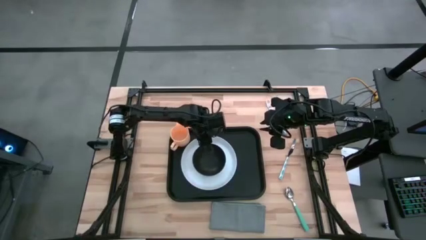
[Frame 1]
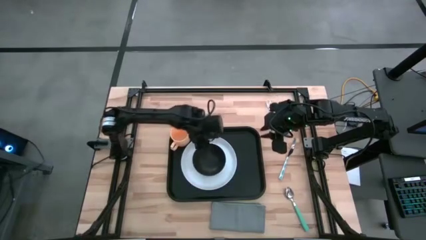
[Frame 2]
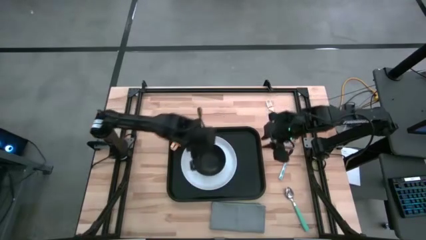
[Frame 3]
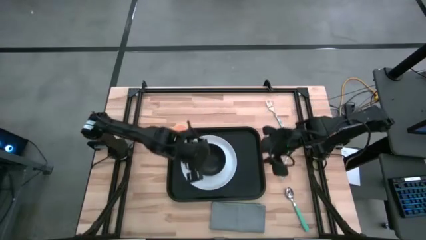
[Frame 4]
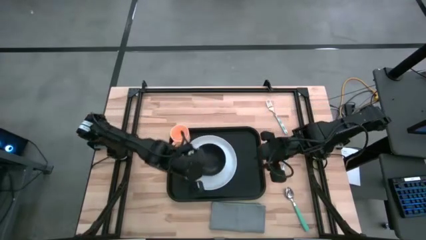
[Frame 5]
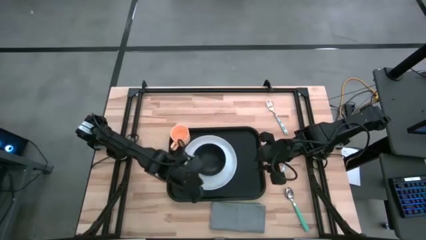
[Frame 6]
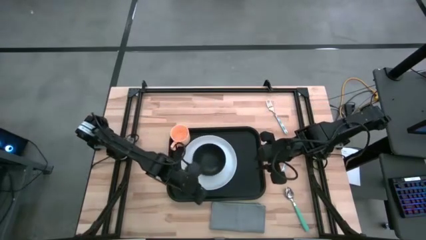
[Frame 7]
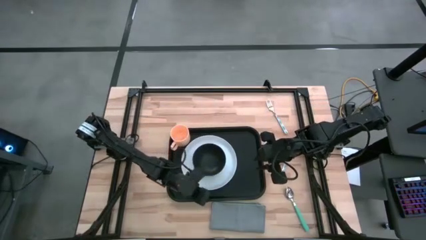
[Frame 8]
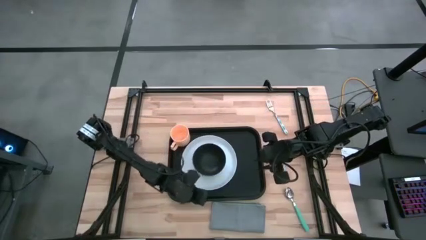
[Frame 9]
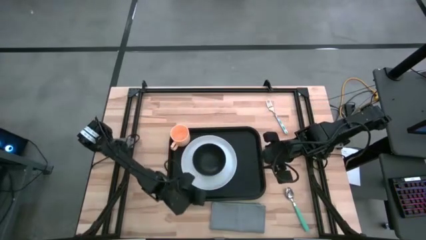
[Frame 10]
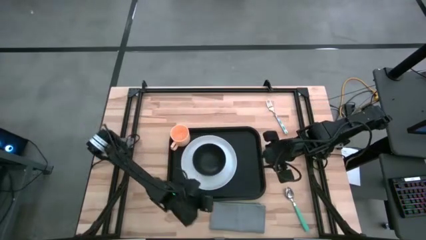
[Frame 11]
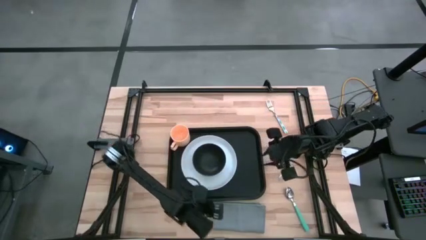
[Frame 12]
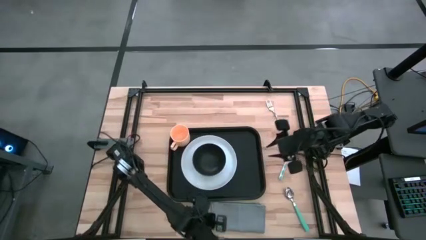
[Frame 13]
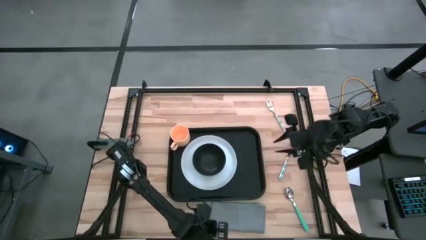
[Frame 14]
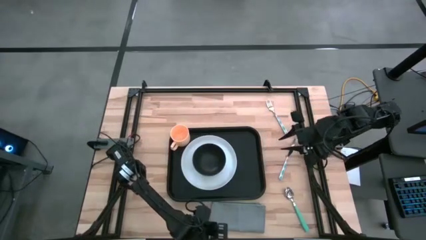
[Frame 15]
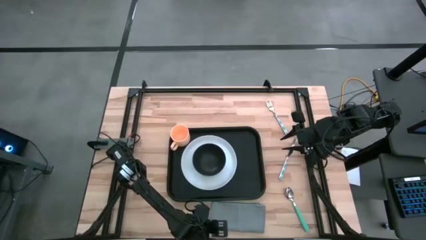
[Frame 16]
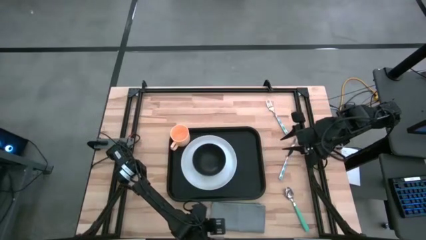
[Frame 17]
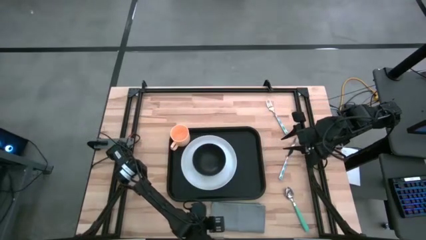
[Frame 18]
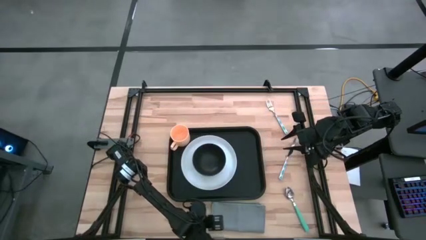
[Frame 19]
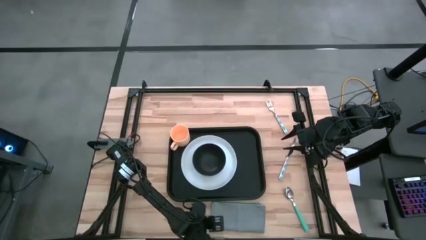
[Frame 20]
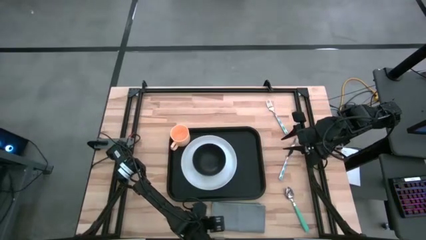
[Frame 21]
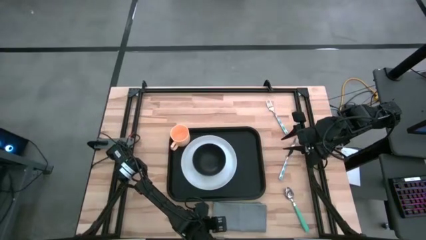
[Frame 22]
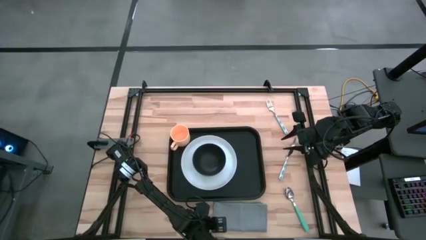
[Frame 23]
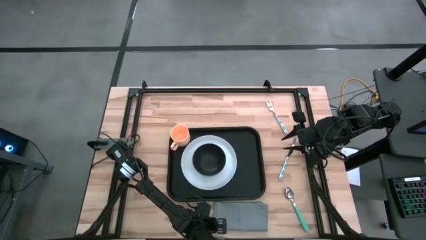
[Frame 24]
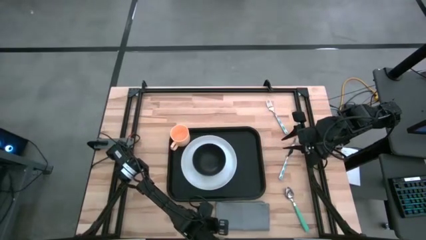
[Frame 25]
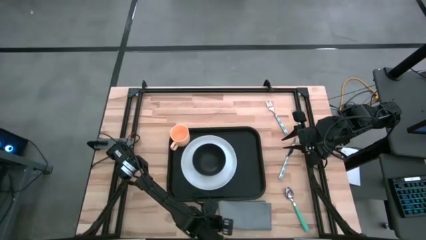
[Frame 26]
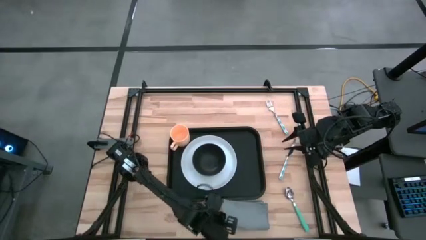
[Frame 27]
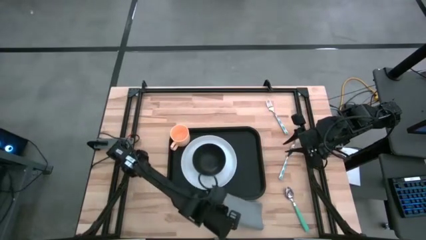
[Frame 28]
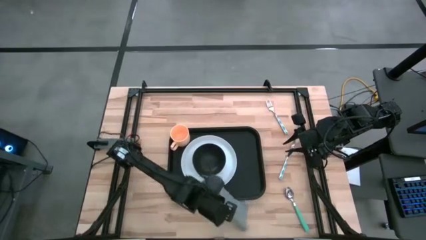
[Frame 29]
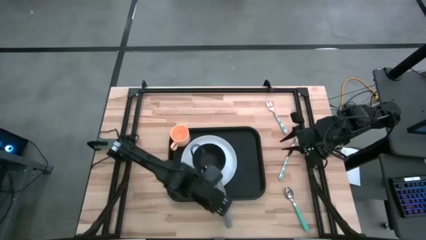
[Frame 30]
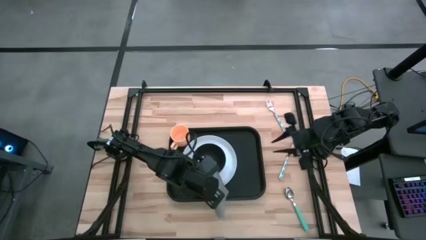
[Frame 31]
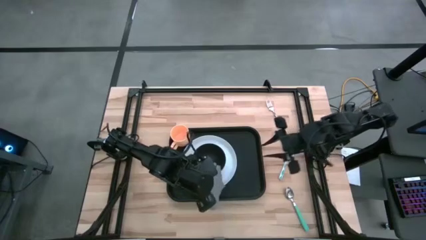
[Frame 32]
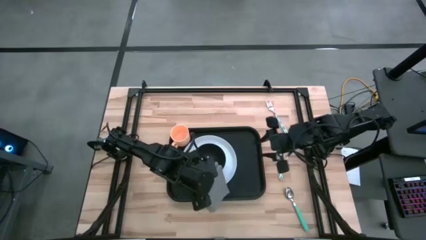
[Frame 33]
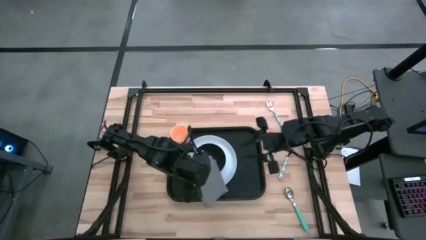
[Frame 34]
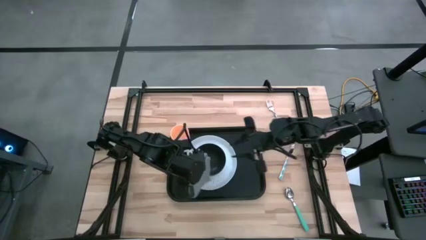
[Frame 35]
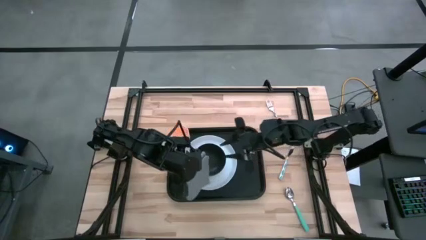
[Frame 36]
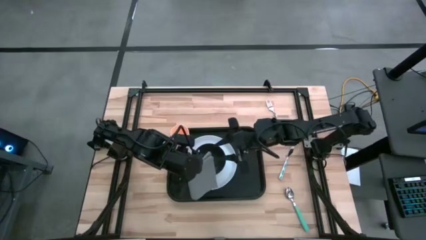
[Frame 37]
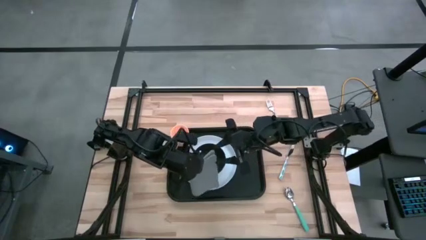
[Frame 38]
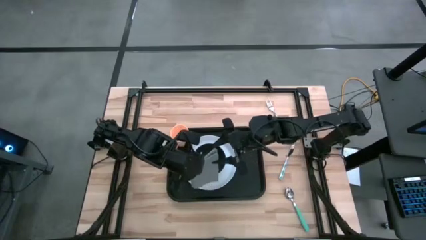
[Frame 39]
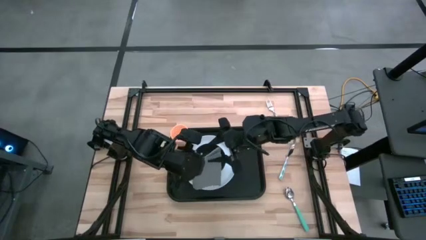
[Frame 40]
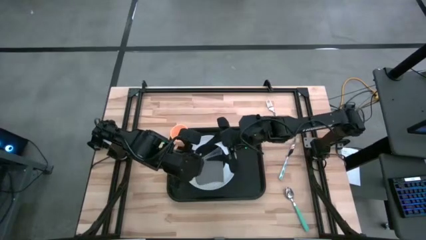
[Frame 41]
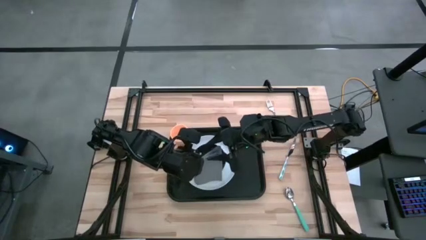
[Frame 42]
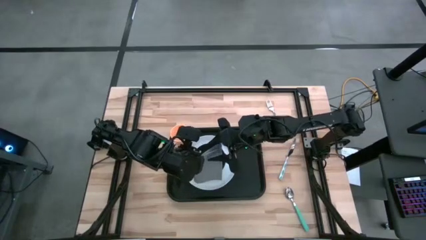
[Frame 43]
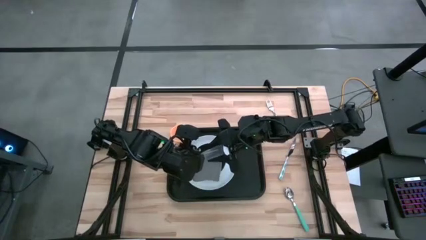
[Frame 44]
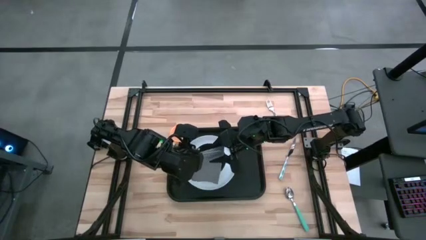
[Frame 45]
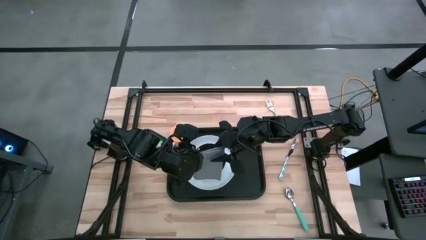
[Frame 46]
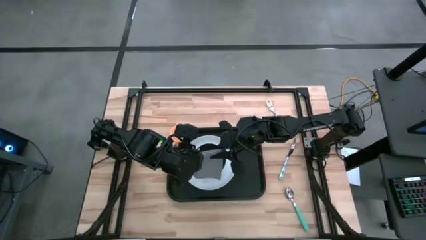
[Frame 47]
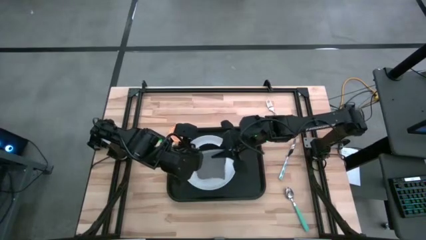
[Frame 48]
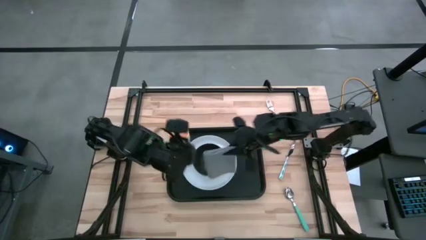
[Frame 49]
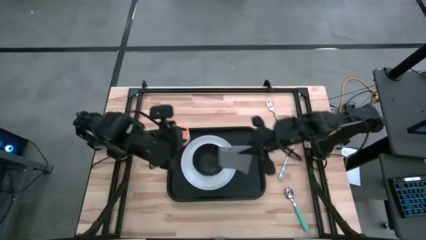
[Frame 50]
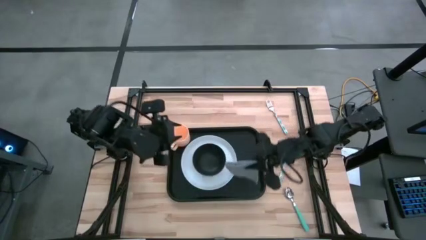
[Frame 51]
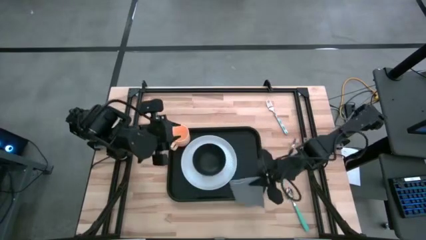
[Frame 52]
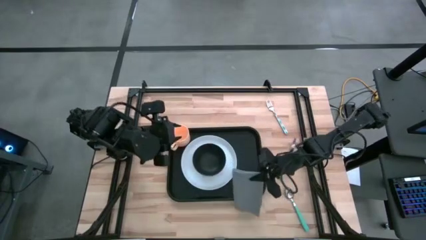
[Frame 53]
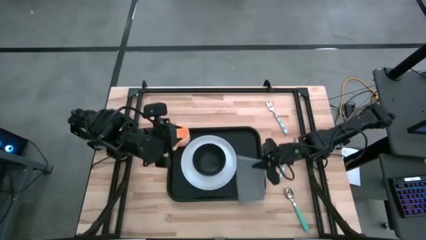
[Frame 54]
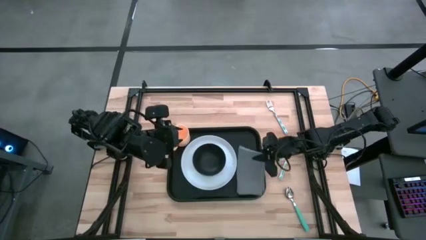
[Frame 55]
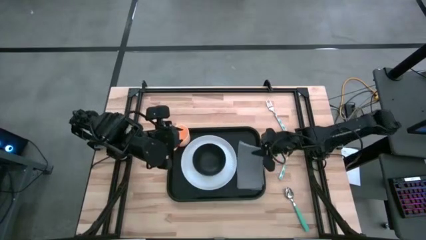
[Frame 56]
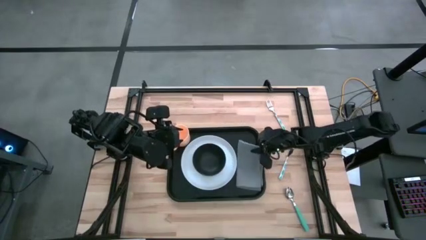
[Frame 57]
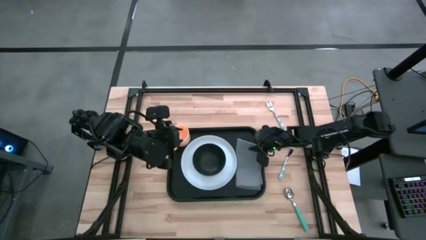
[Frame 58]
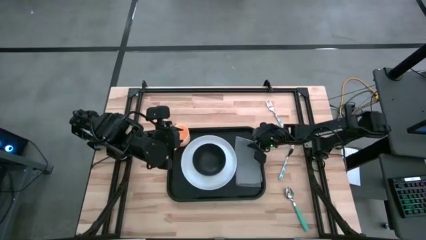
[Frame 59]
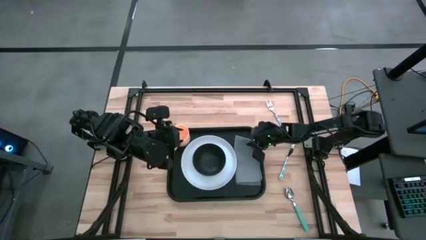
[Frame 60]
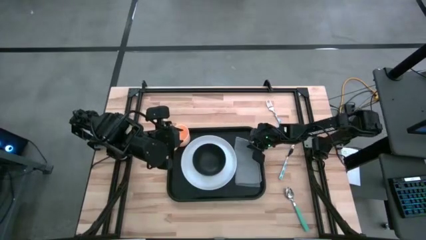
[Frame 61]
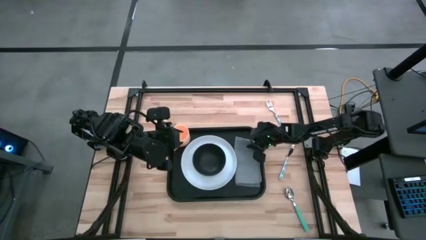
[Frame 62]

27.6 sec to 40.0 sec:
Task: Set up tray
Put the gray table napkin on the serving tray

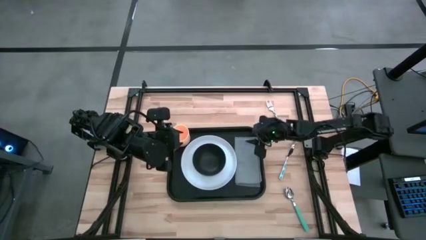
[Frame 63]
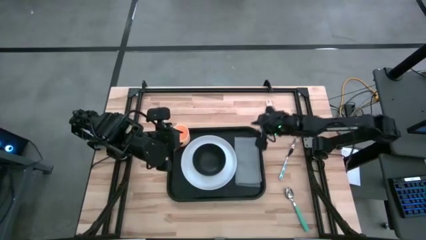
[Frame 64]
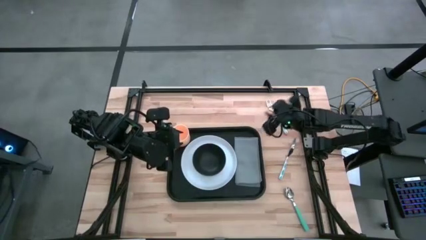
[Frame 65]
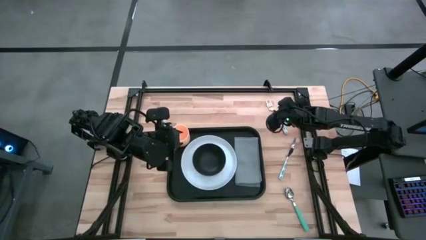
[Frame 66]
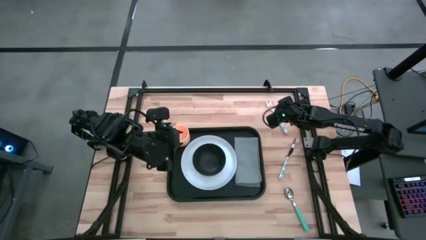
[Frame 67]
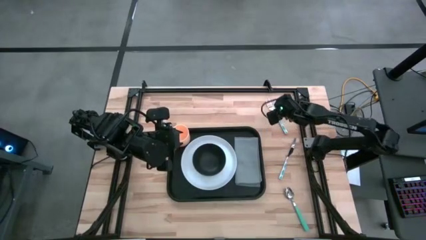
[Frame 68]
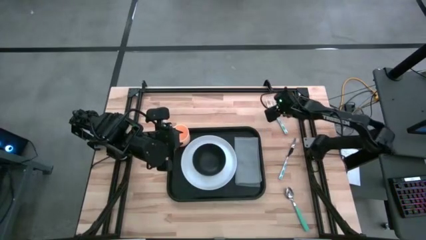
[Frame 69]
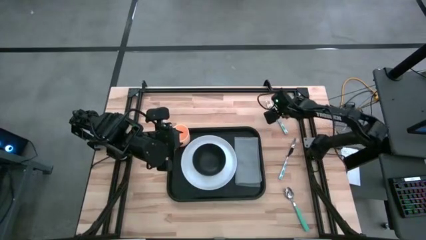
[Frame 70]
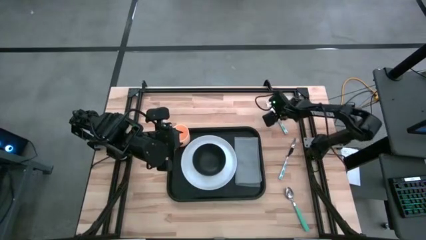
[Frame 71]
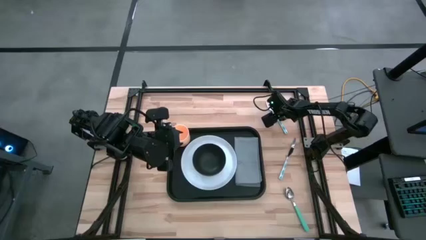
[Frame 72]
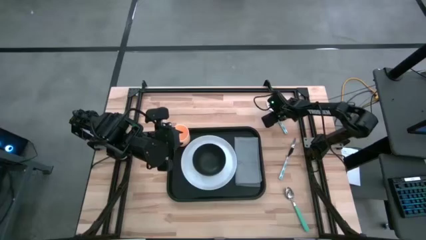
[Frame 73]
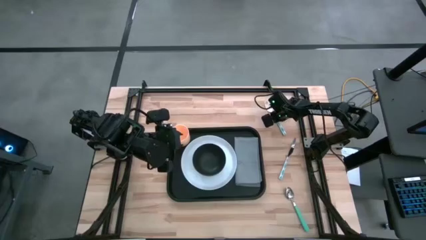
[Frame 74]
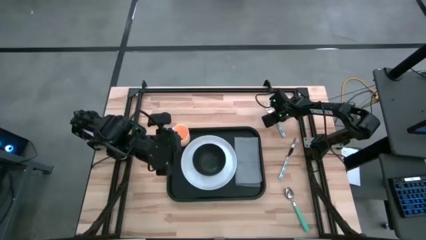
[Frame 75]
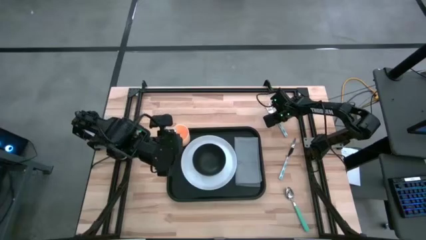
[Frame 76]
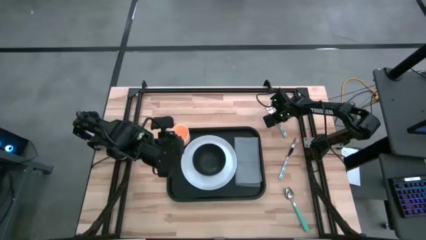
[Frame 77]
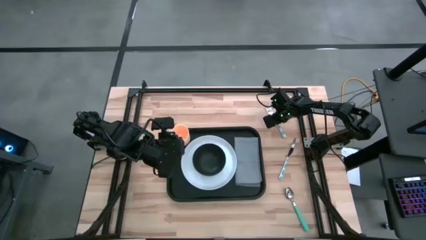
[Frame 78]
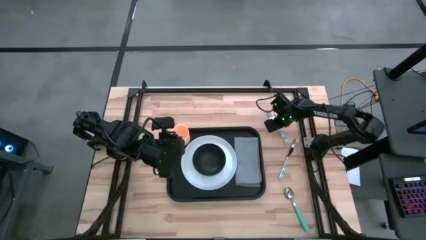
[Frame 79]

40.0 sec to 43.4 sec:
Put the blue fork on top of the gray table napkin
